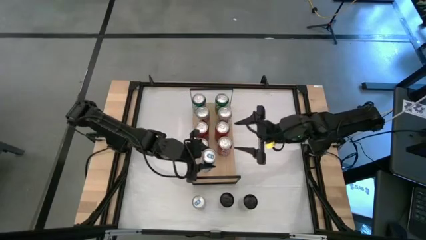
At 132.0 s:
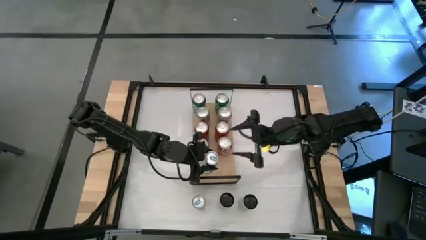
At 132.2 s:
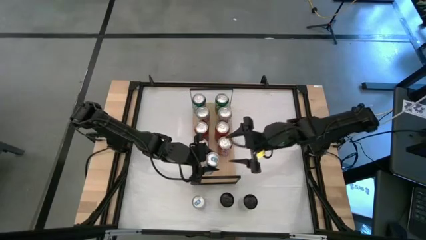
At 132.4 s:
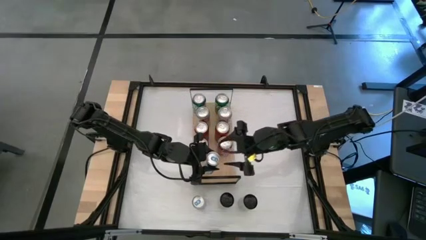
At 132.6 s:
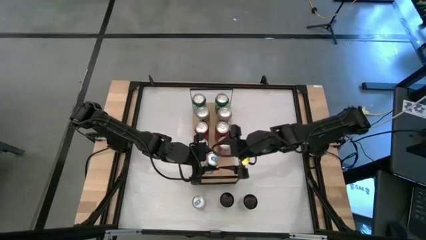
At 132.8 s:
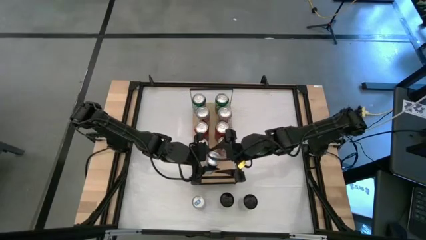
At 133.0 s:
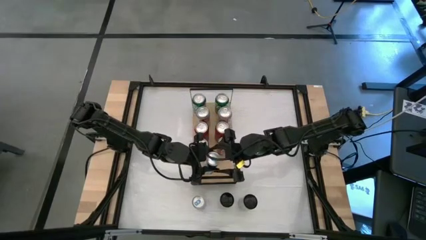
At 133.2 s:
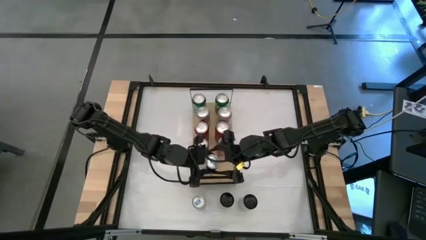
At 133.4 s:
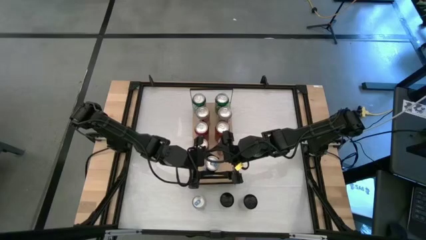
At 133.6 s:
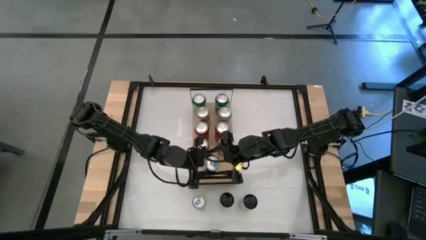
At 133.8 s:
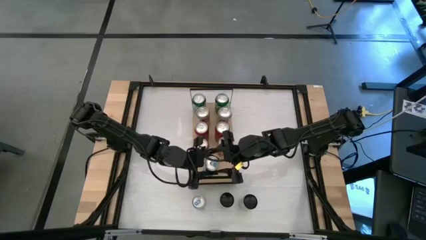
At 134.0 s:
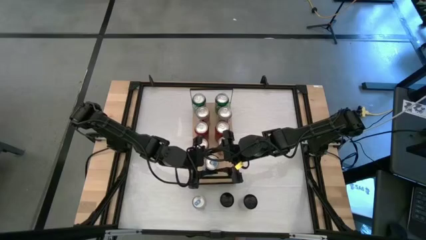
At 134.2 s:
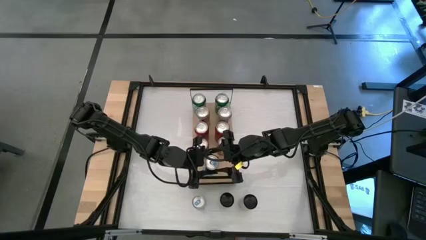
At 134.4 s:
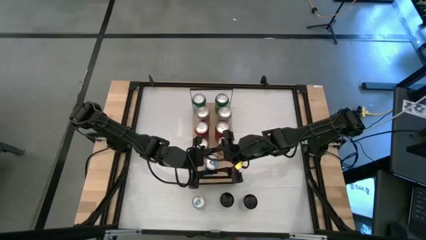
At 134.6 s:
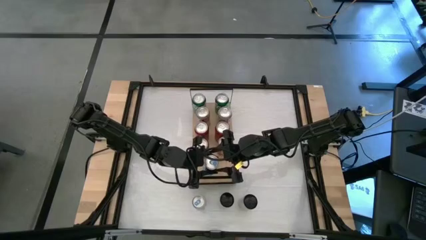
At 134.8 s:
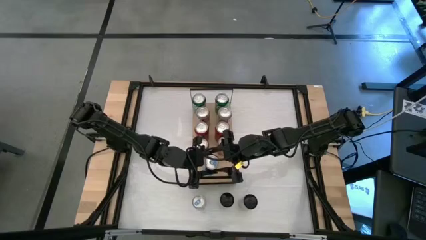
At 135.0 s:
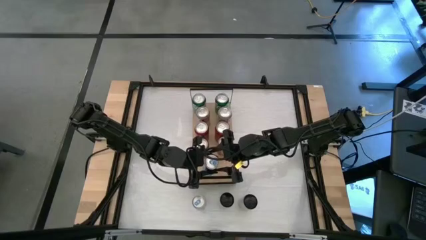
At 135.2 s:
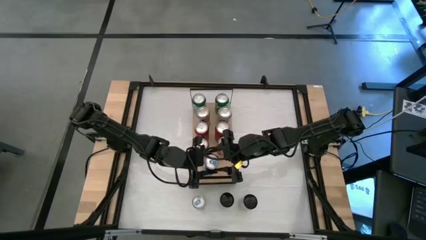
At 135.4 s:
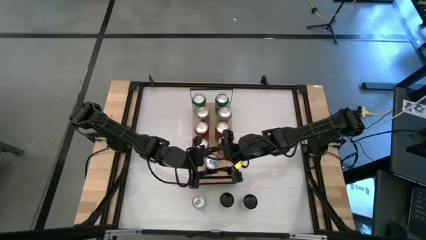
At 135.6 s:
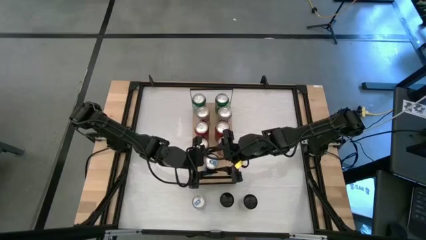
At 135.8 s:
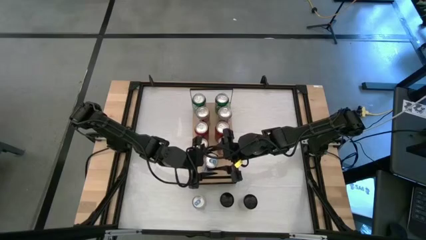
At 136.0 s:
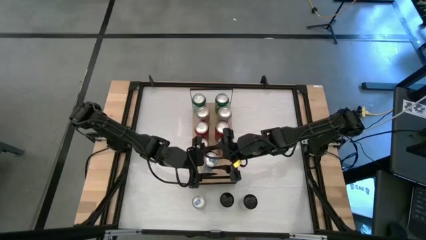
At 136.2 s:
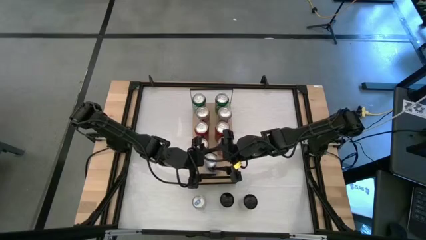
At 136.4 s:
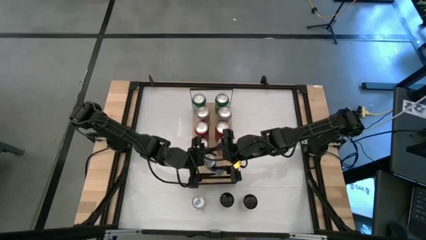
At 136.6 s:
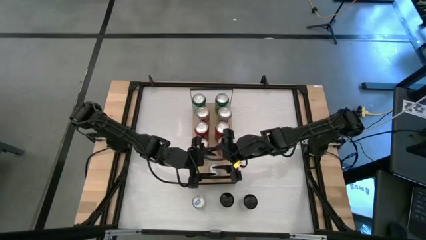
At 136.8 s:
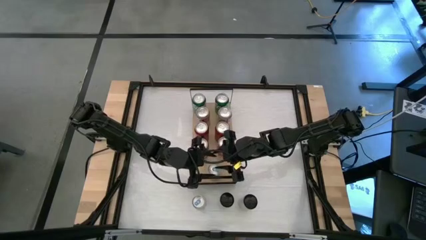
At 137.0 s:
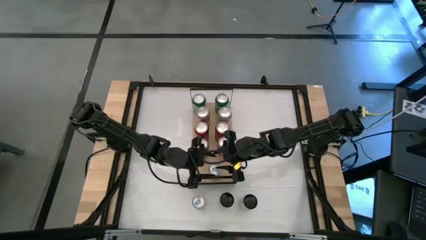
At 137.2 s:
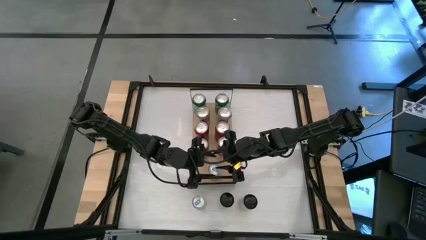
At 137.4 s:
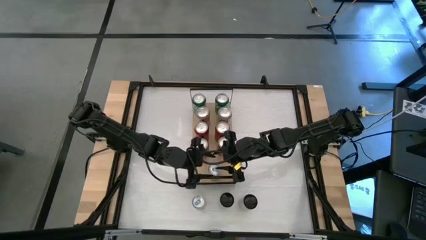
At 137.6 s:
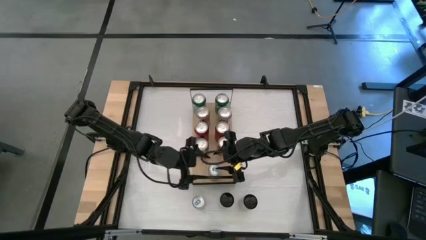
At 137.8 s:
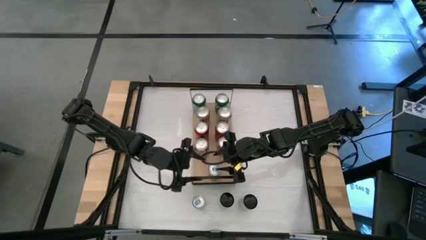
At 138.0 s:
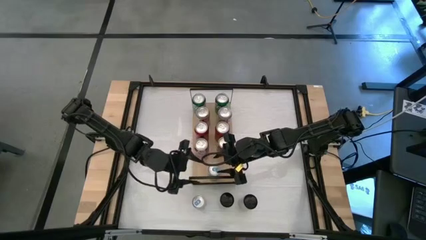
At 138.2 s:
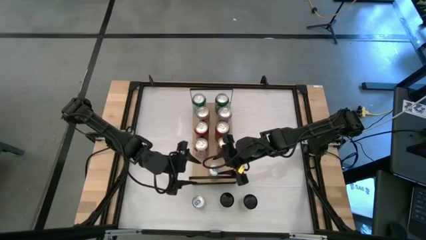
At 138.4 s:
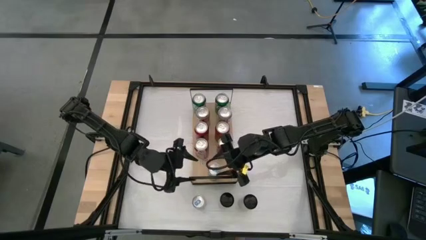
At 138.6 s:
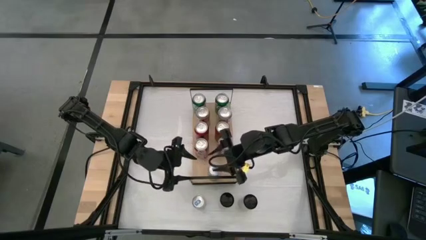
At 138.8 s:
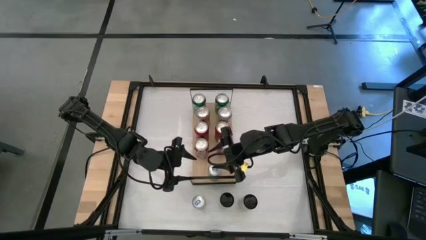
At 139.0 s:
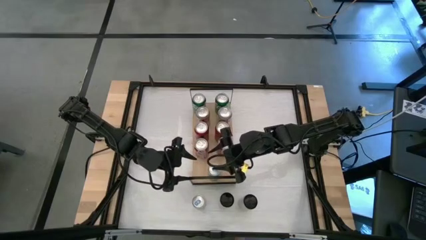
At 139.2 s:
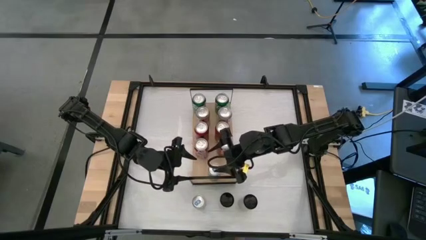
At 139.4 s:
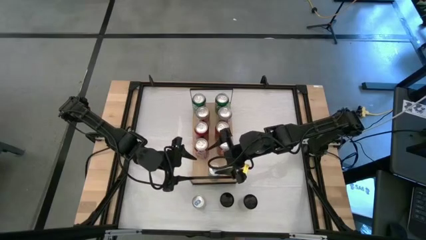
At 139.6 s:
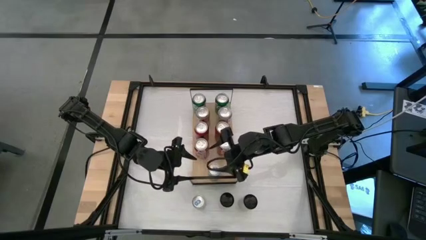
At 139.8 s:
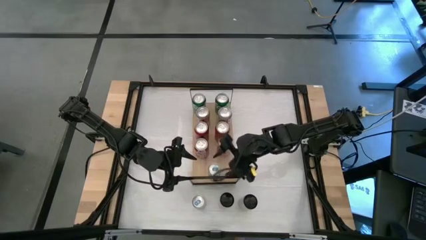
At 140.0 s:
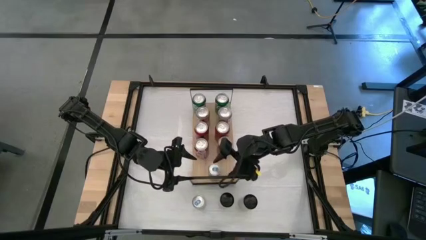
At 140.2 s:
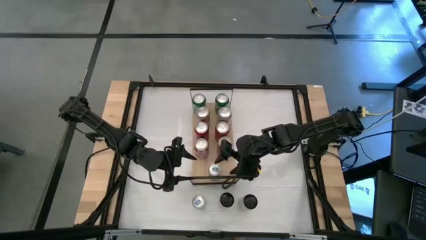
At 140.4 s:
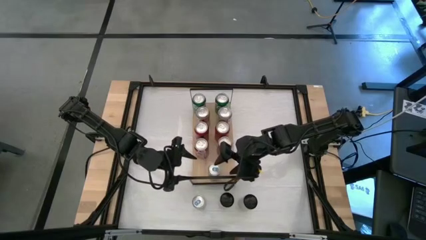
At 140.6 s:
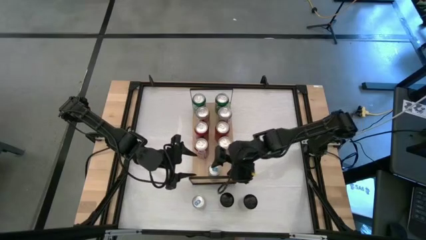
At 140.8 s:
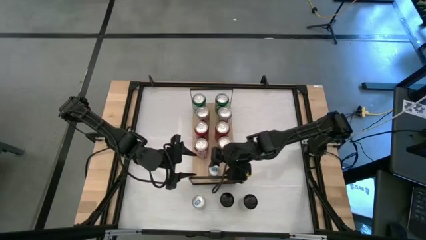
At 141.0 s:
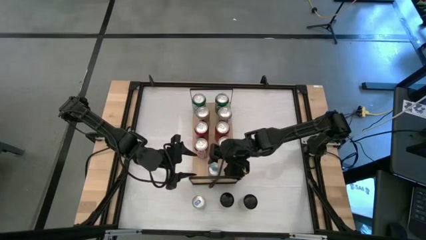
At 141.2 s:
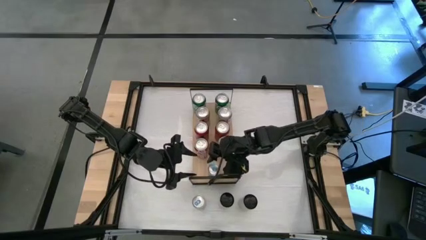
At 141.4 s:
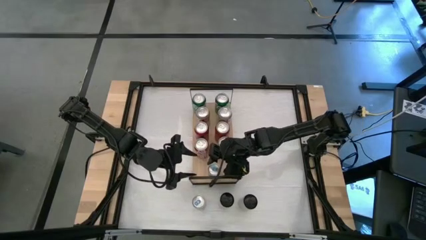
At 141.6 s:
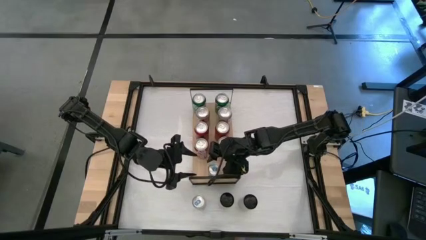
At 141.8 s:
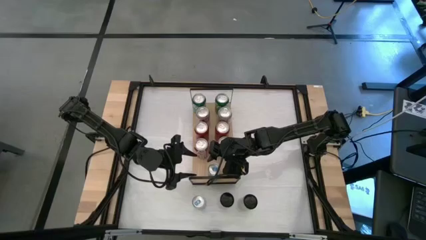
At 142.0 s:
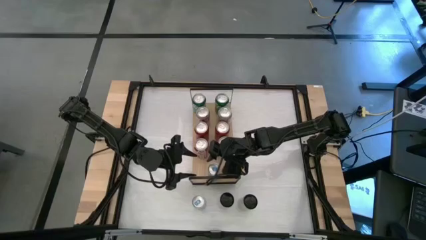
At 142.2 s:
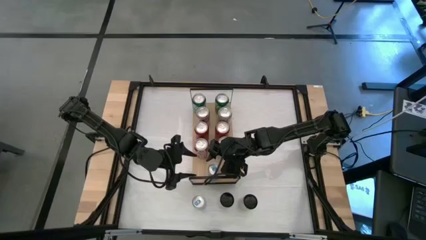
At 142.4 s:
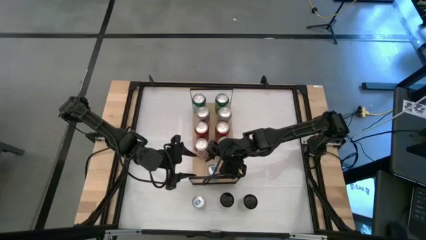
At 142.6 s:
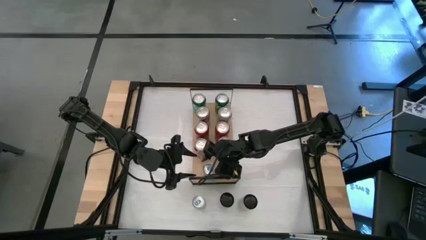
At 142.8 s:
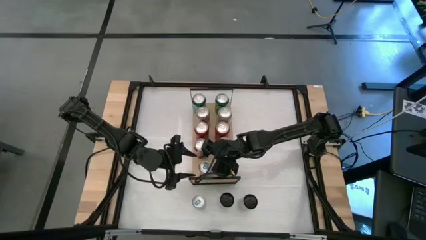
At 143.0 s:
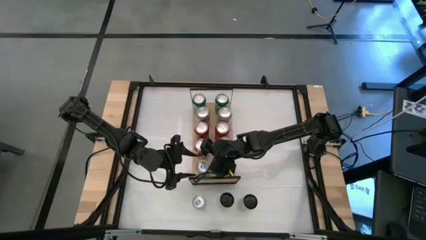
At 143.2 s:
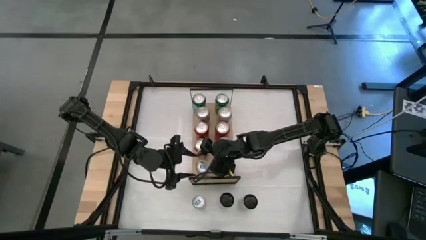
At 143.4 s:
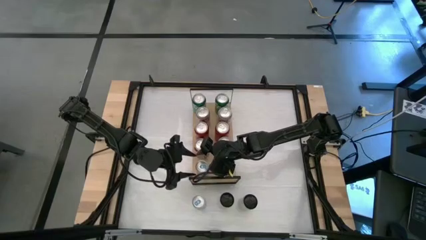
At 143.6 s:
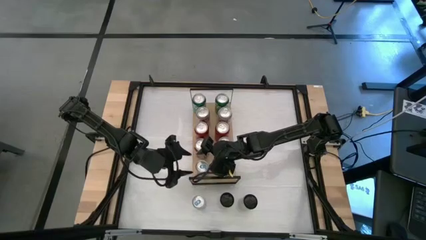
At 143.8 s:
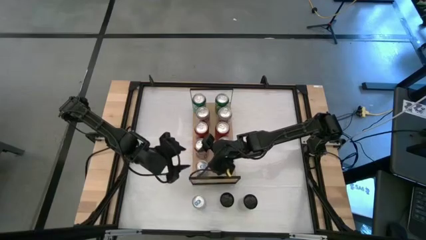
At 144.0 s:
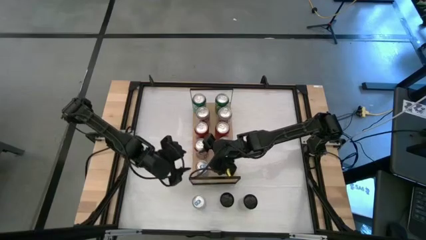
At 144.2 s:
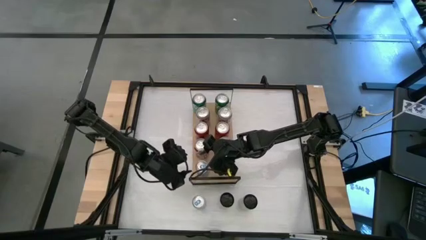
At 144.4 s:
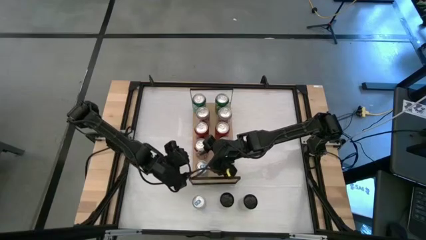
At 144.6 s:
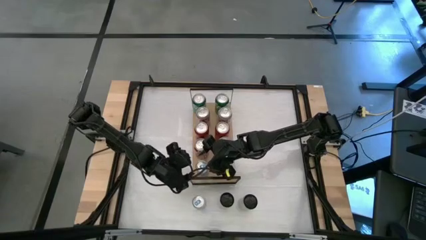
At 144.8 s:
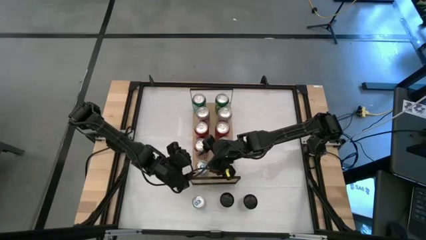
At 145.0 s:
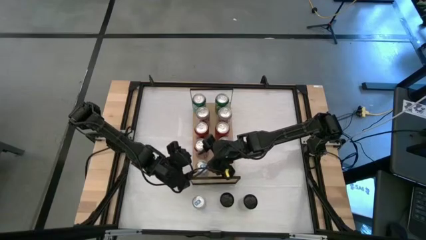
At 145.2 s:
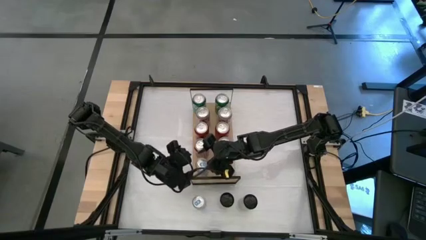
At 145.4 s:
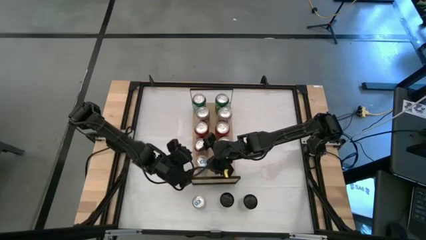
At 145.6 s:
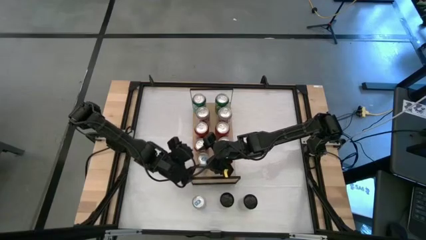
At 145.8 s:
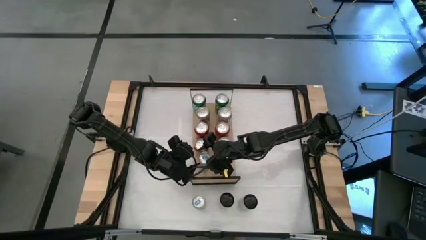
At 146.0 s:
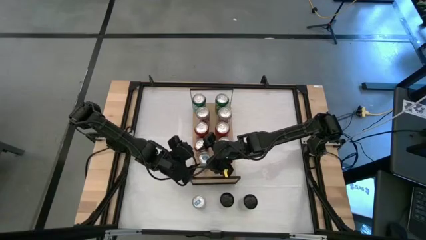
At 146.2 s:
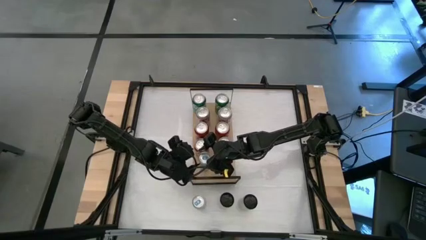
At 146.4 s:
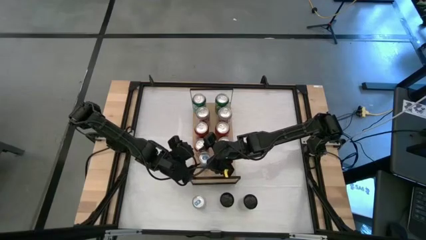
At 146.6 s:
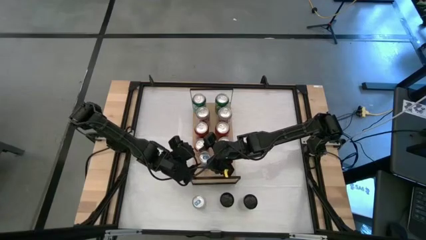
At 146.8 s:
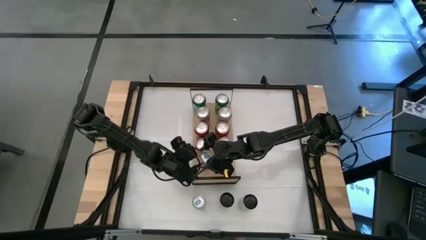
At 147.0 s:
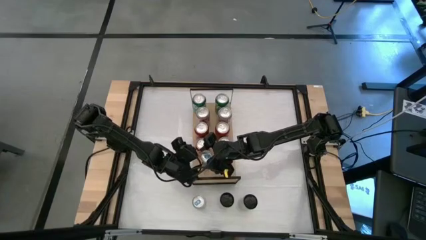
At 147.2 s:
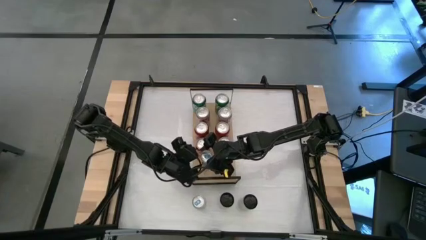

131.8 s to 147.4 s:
Task: Place canned beverage on shelf
Put the top blue soda can on the shelf
